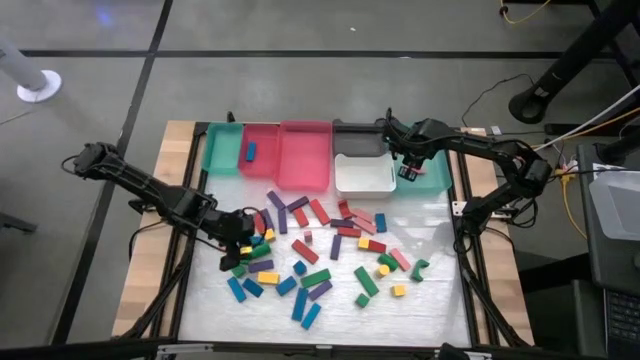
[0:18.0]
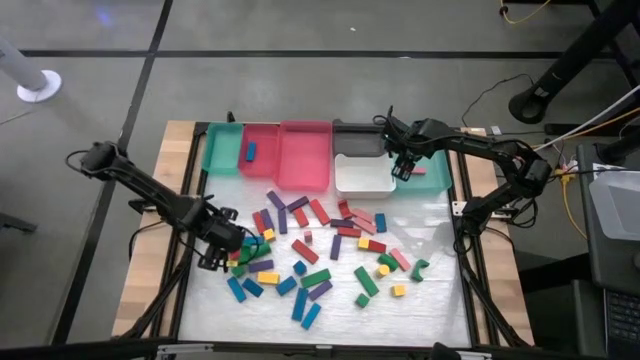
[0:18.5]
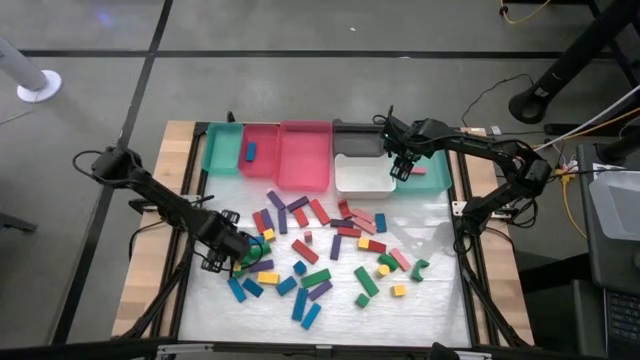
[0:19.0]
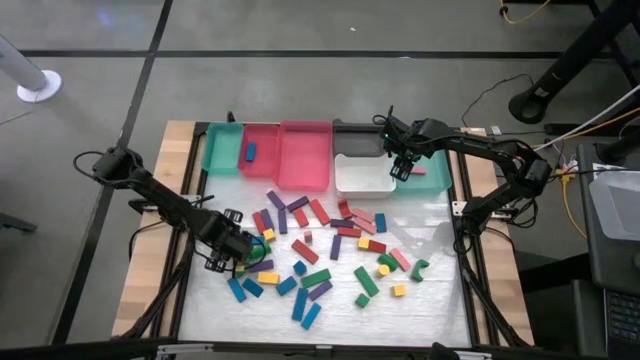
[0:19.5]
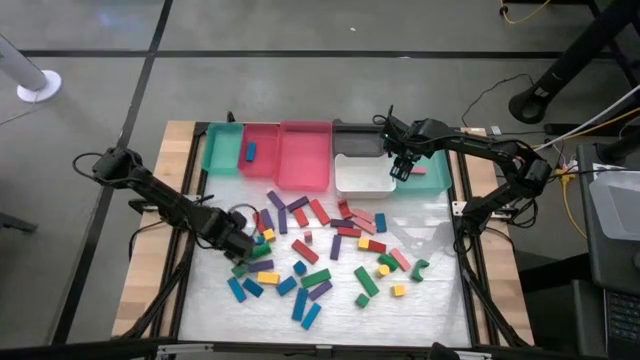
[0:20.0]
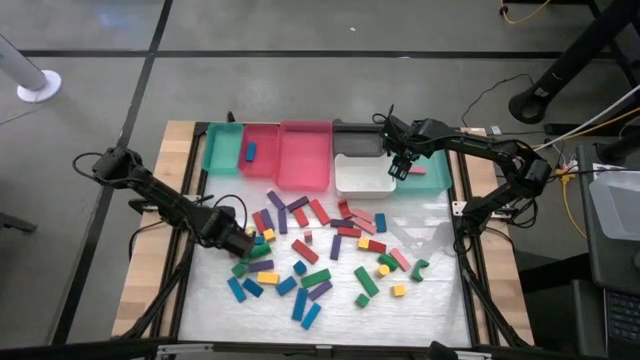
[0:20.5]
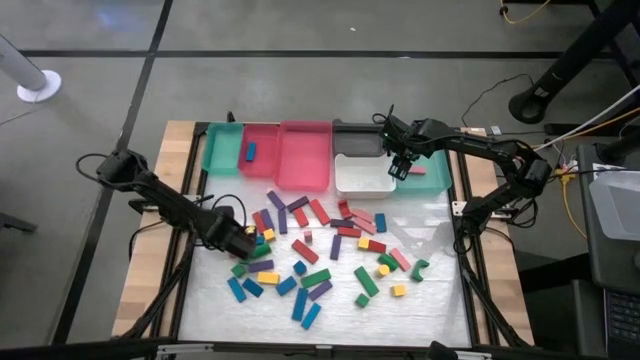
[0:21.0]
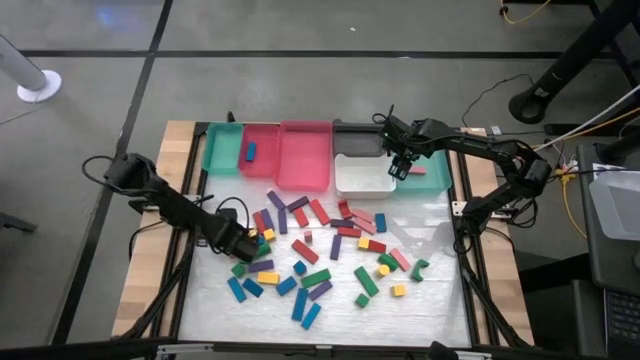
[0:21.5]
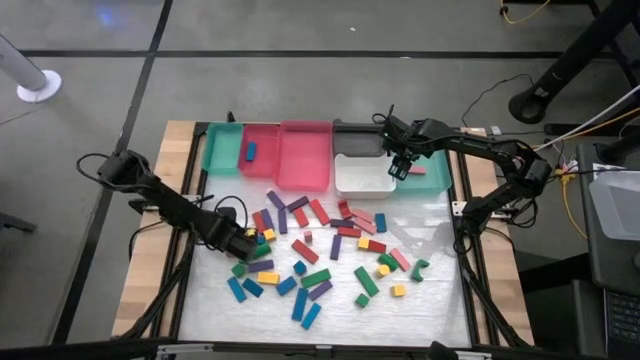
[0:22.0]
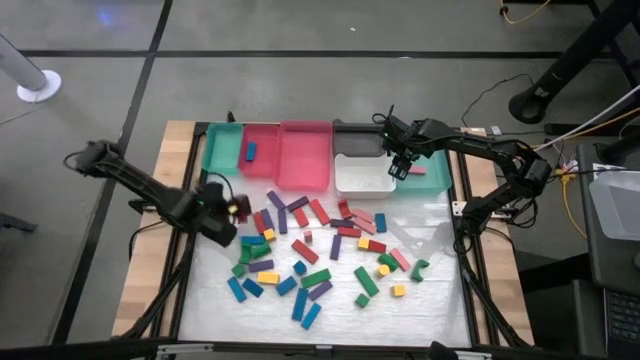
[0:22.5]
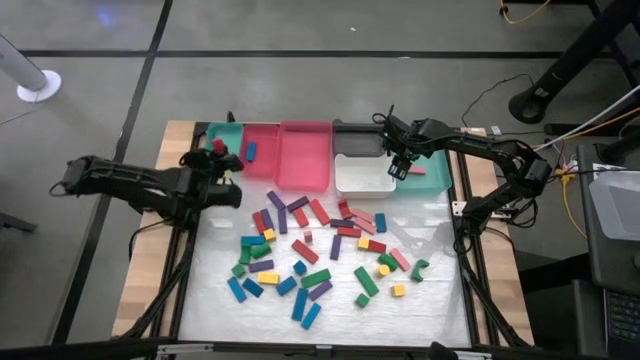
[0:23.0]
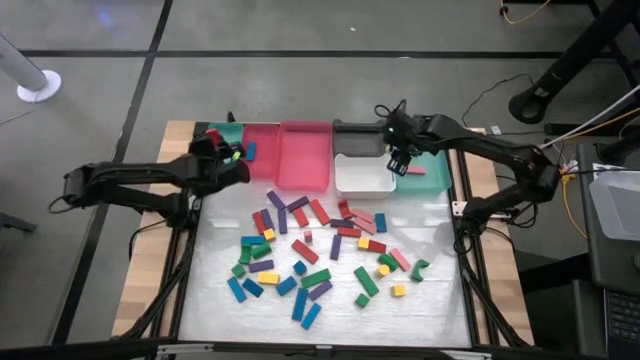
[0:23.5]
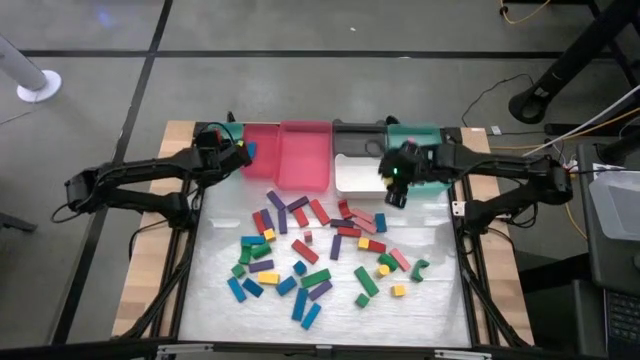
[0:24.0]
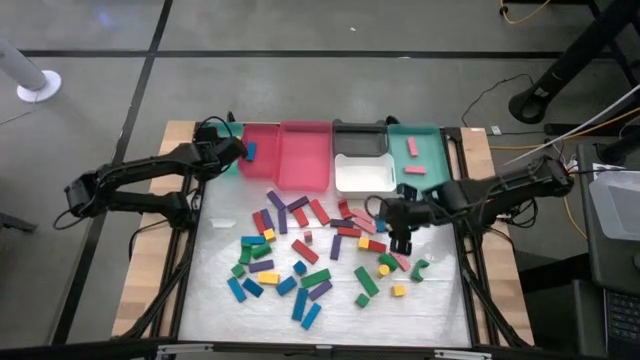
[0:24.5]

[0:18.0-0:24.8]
Task: Sort blocks
Put the red block into the left green bin

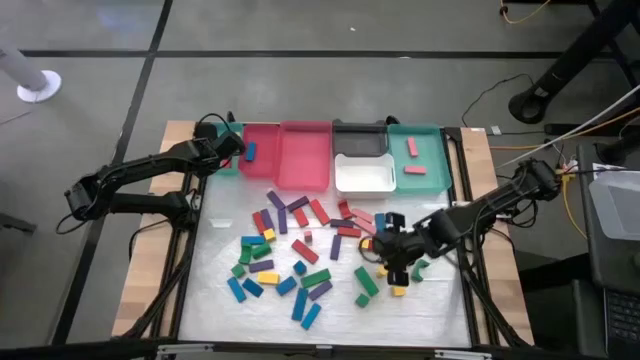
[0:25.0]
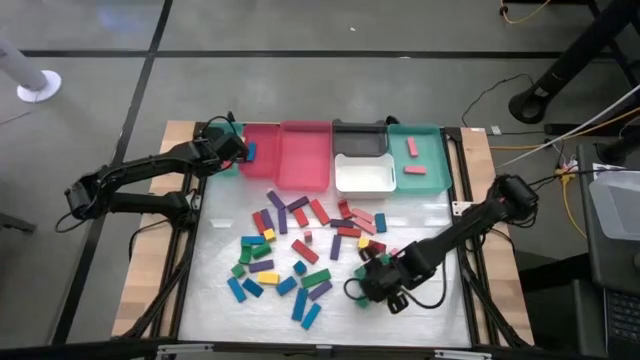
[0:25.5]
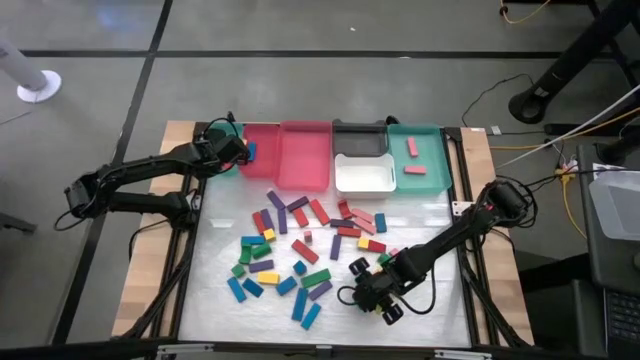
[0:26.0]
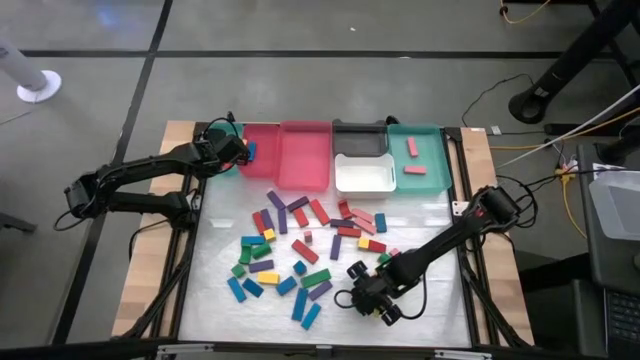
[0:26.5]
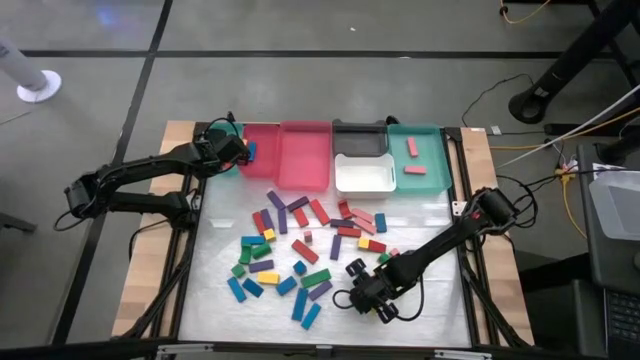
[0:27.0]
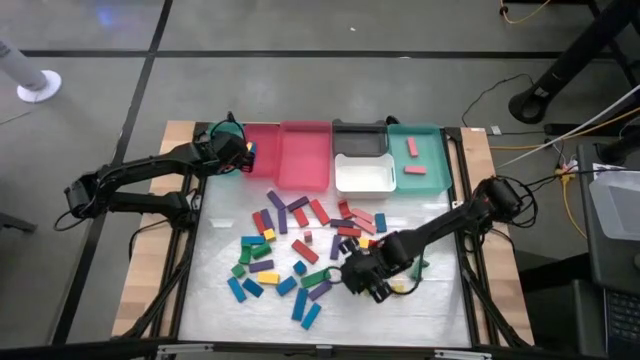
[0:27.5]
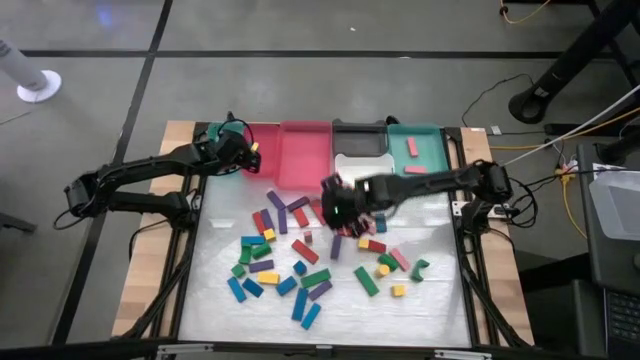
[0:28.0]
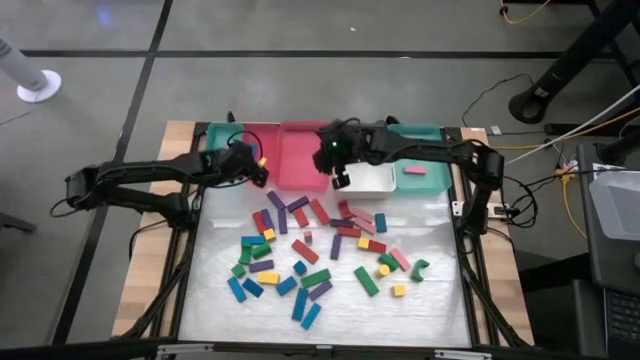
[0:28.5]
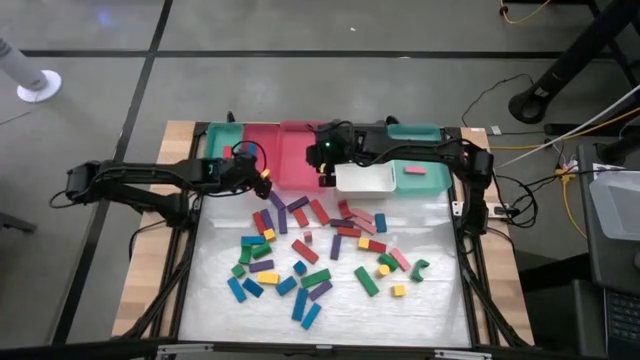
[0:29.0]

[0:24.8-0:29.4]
Put the green block into the right pink bin

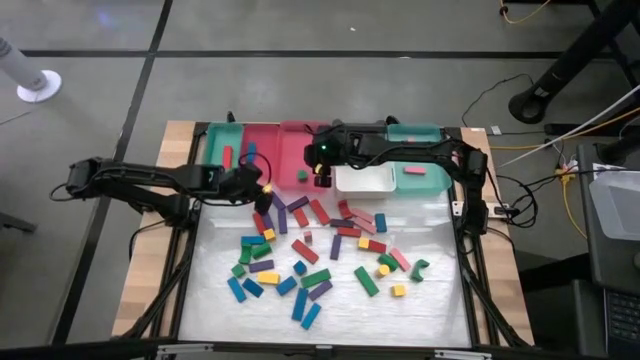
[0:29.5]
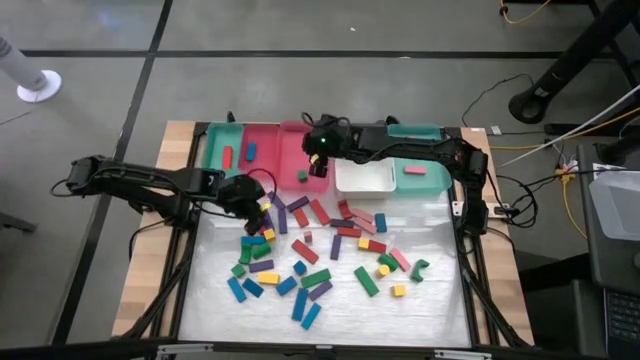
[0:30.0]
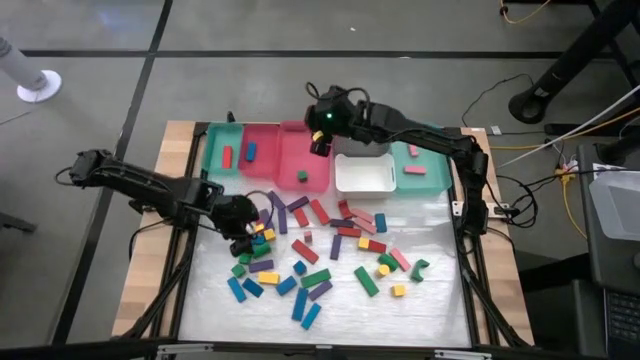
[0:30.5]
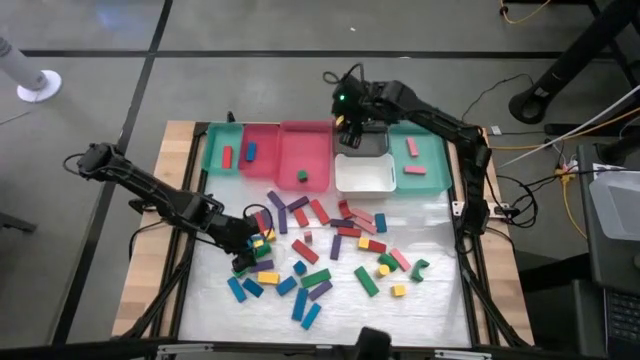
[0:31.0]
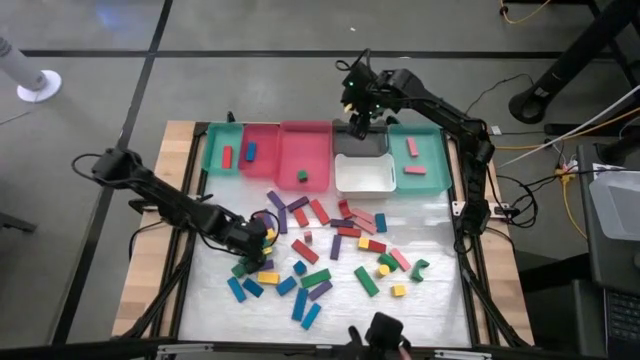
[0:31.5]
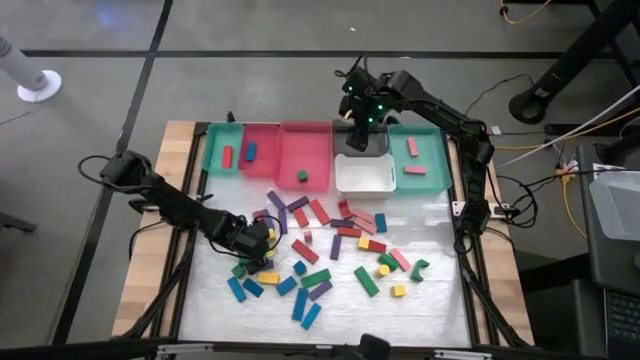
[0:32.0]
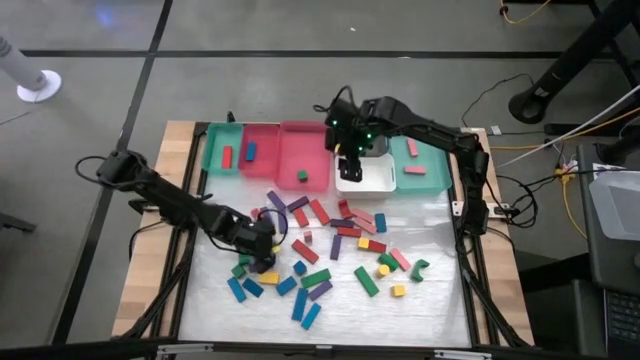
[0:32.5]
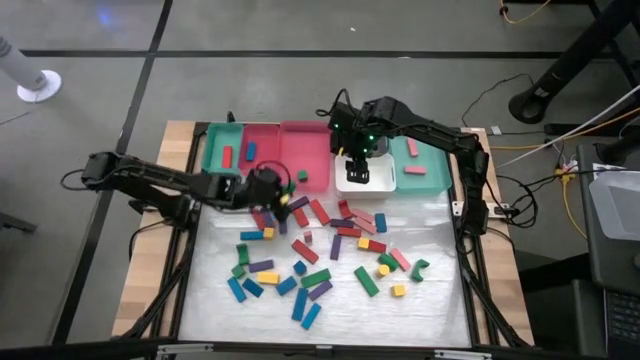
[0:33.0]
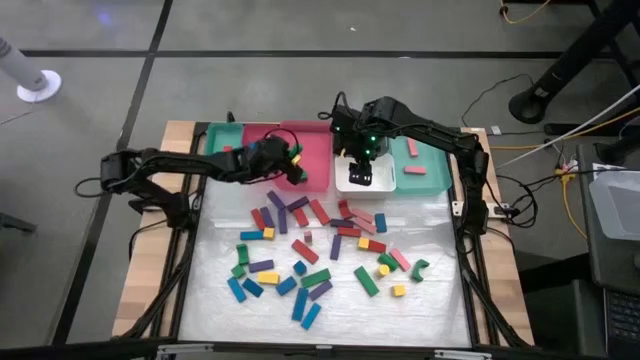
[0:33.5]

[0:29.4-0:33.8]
Put the green block into the right pink bin

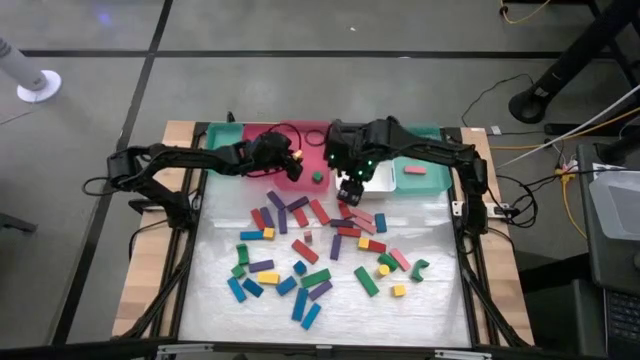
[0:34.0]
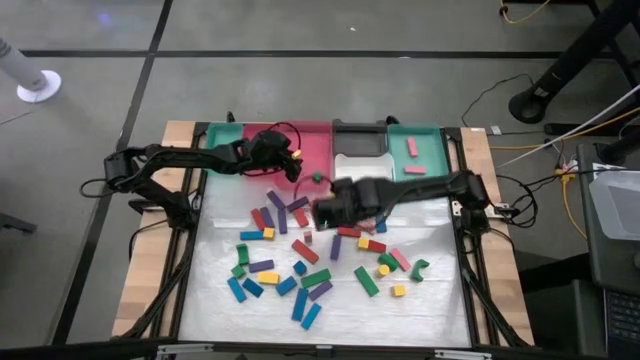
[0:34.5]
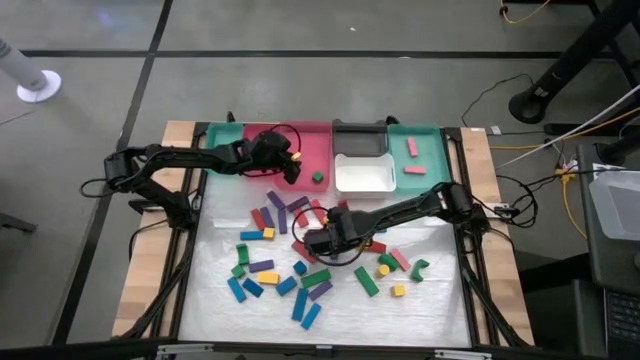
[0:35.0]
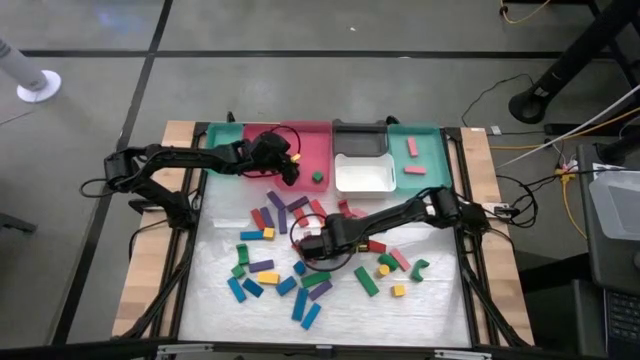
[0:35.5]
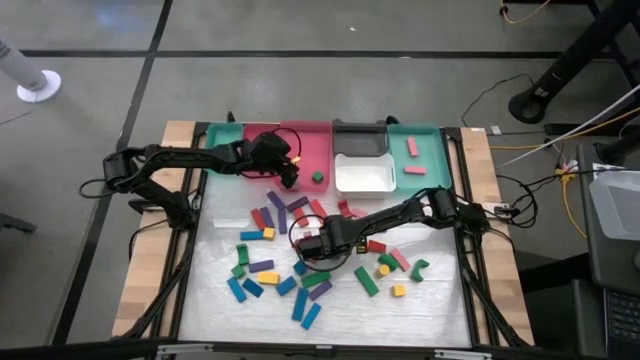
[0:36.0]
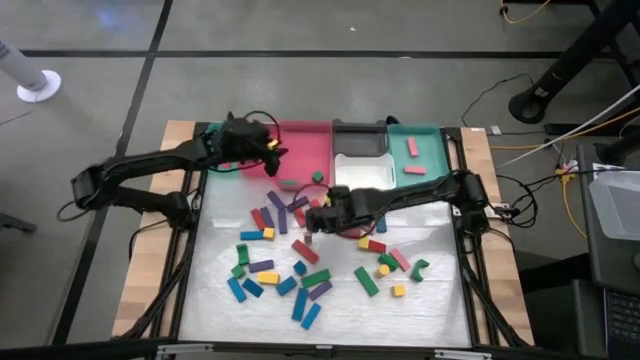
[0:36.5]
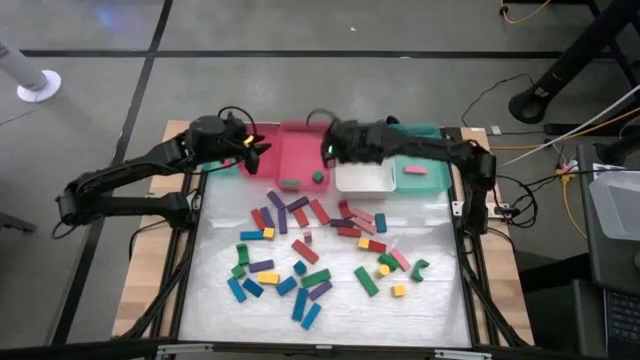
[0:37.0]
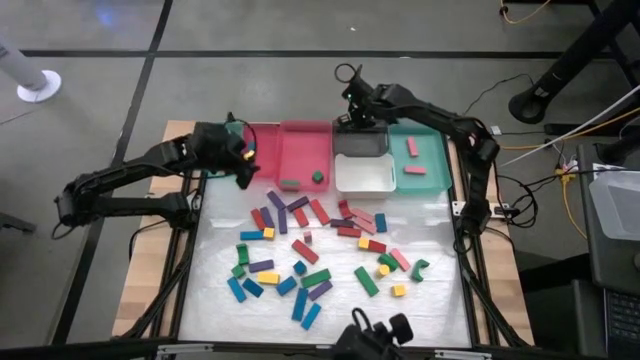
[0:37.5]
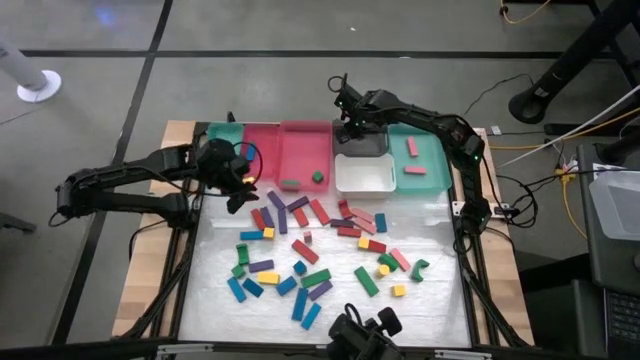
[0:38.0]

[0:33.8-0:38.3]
Put the violet block into the black bin
